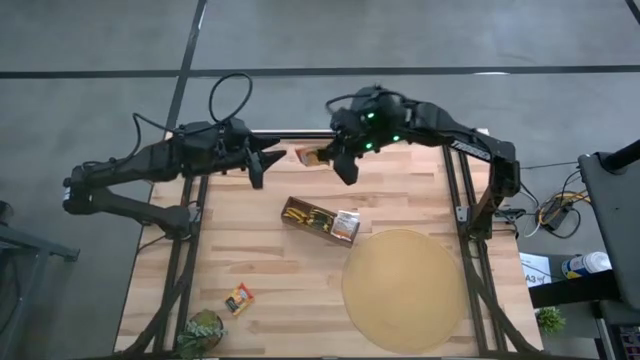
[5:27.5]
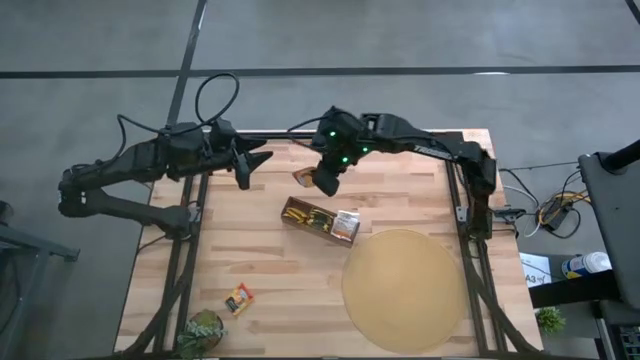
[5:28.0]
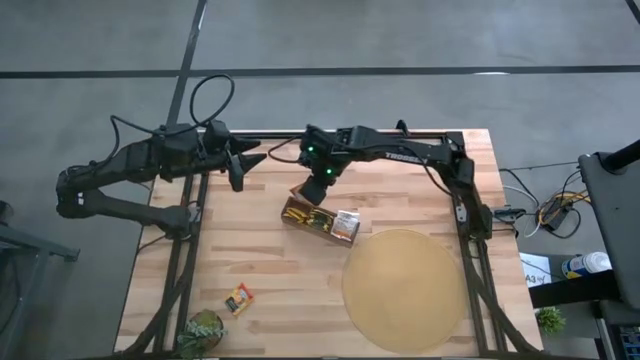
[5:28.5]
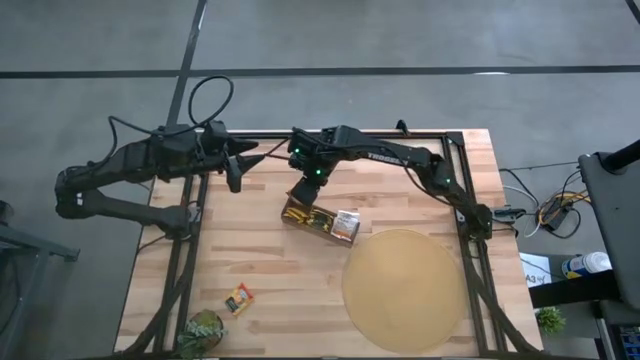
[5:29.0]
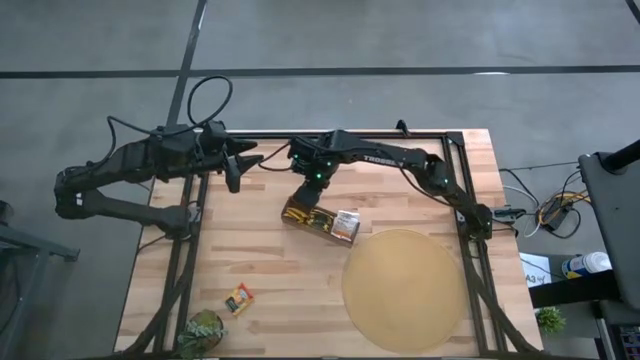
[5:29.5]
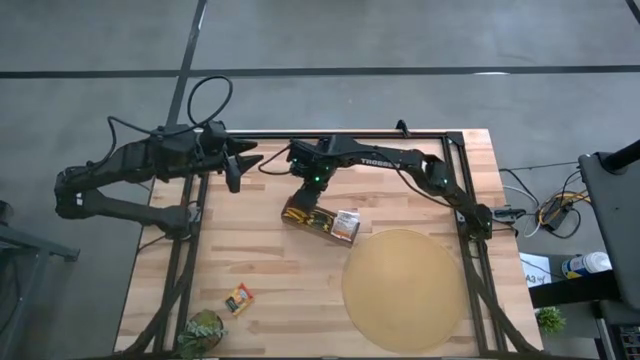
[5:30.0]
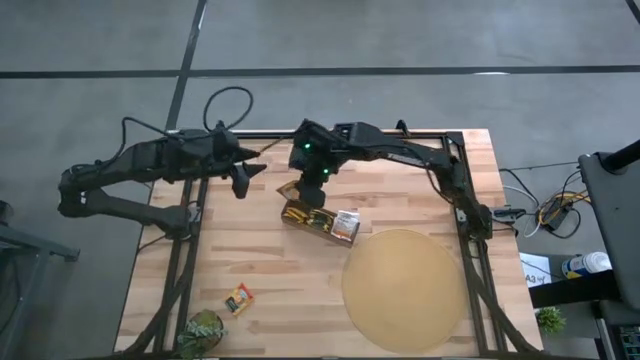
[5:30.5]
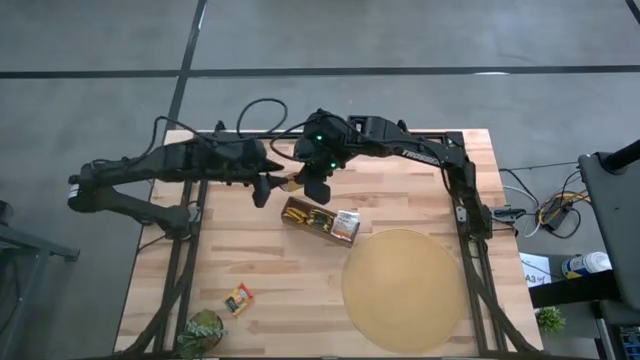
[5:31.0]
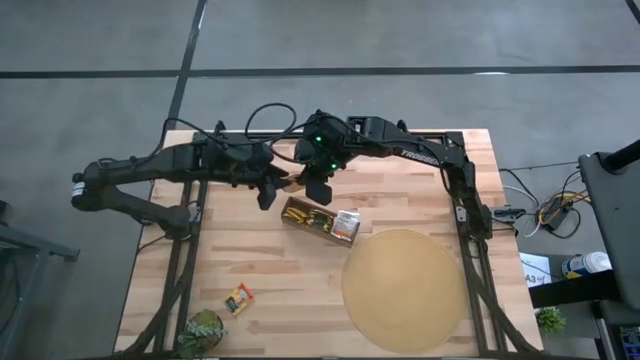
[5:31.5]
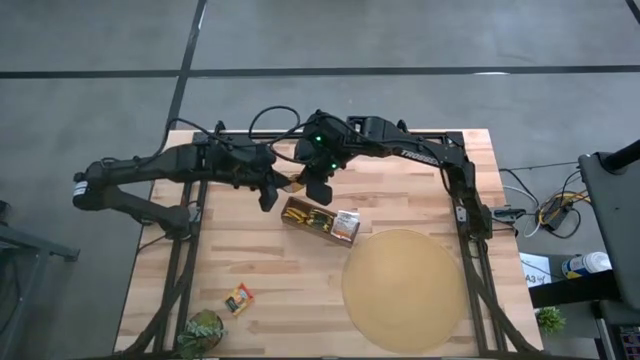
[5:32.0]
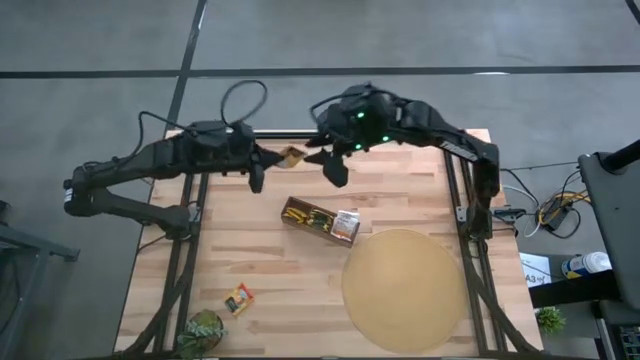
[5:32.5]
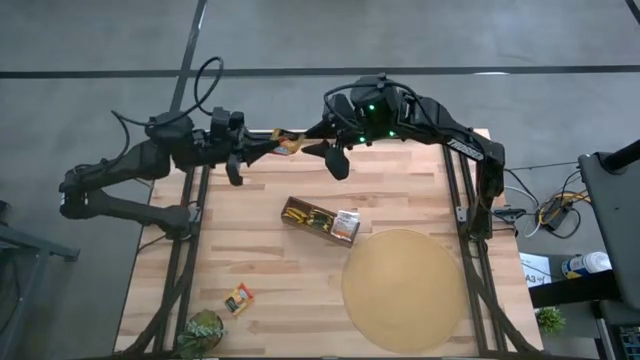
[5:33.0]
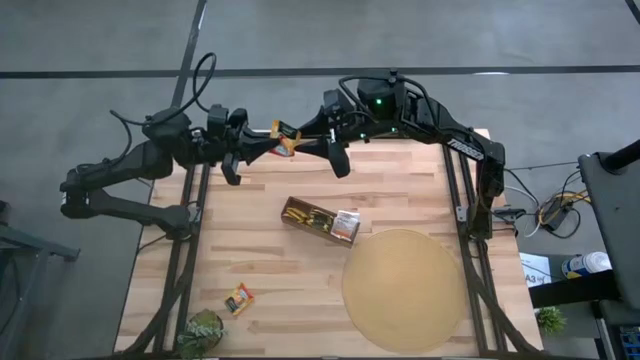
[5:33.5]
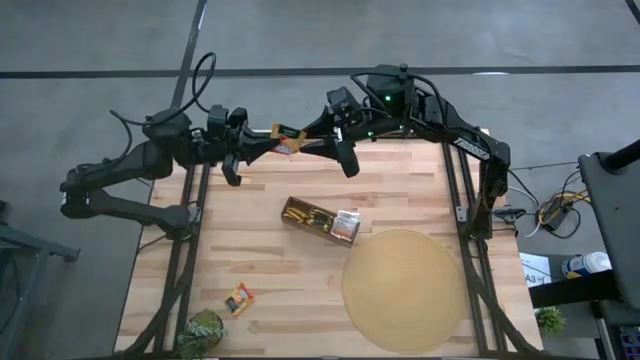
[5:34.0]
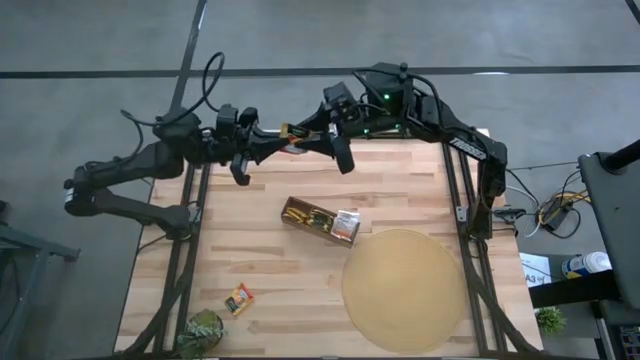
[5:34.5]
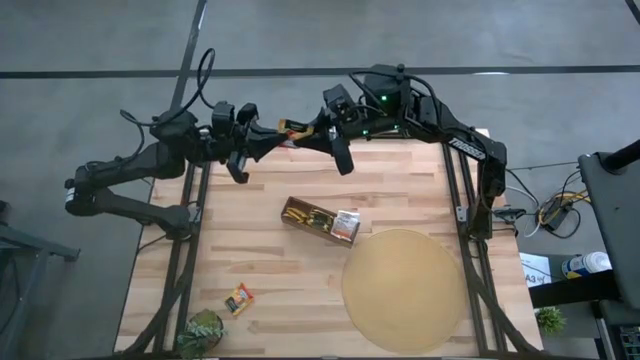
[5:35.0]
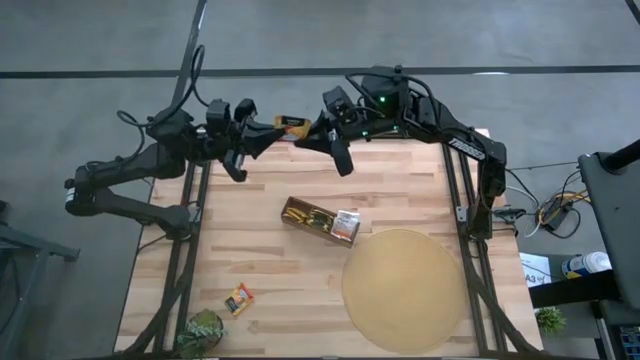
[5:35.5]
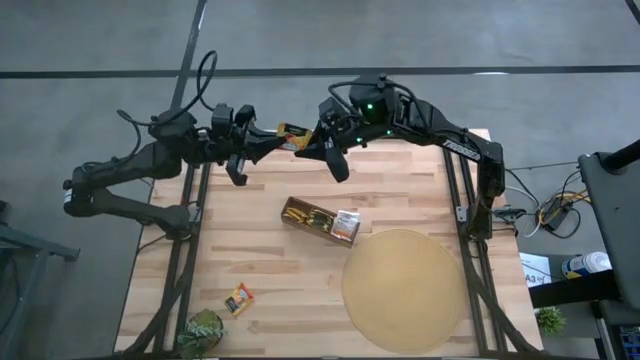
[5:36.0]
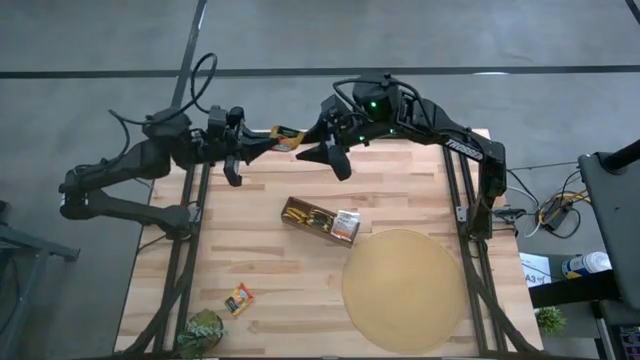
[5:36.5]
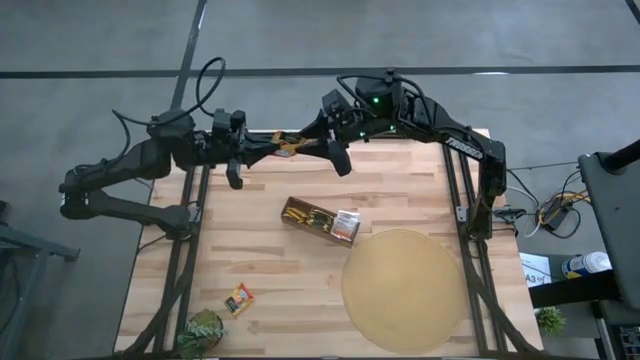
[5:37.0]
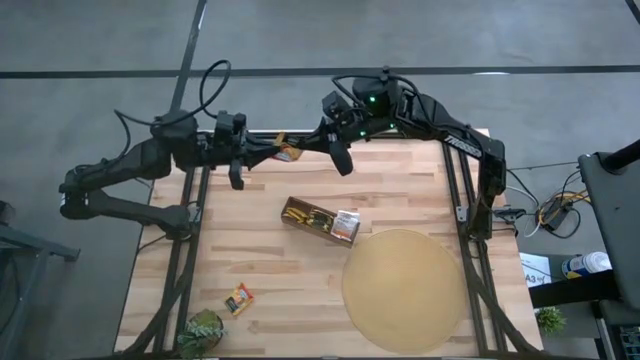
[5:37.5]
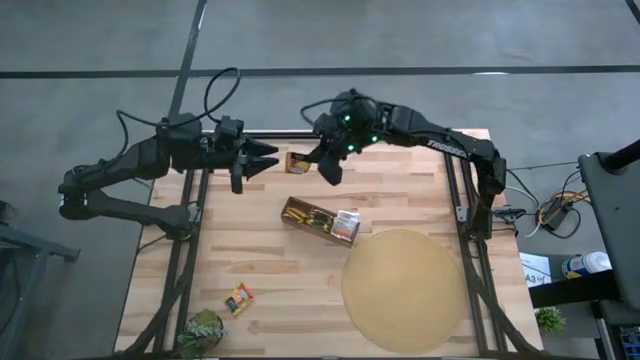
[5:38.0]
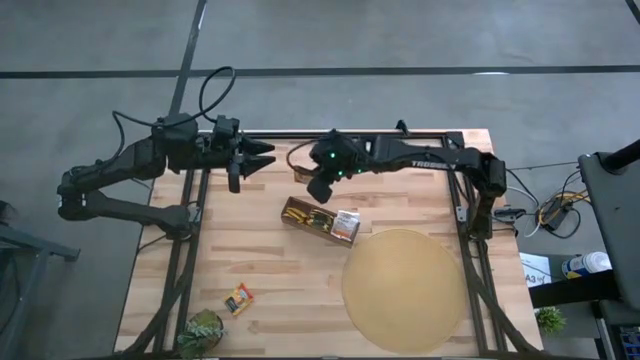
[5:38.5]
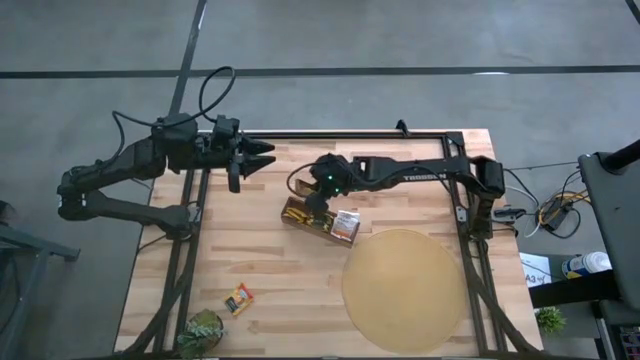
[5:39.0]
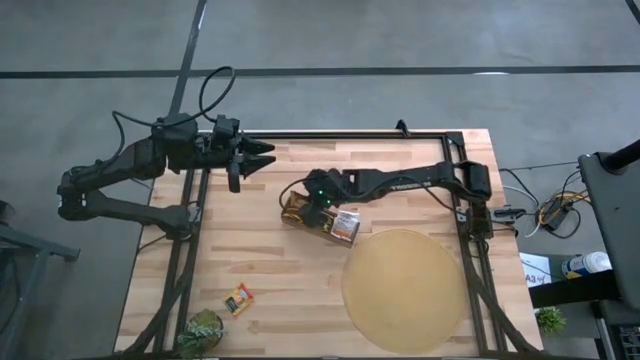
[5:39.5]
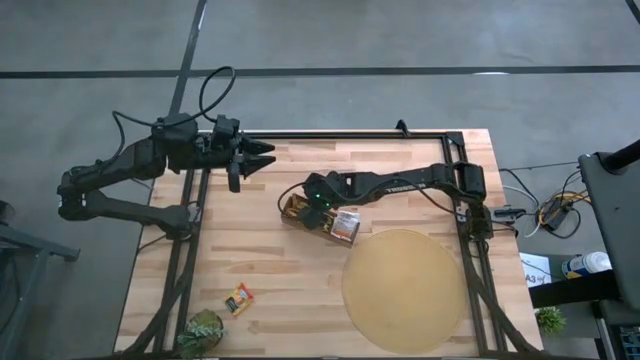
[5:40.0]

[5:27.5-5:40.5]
Task: Pick & Place Tea
Put the orange tea bag into the left section of the wooden organizer

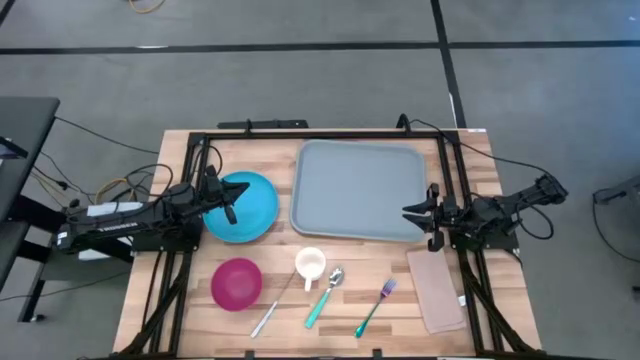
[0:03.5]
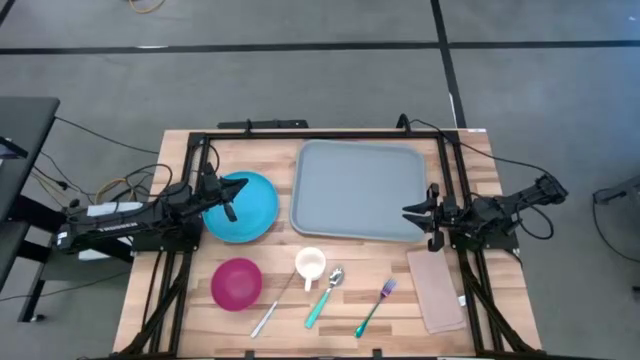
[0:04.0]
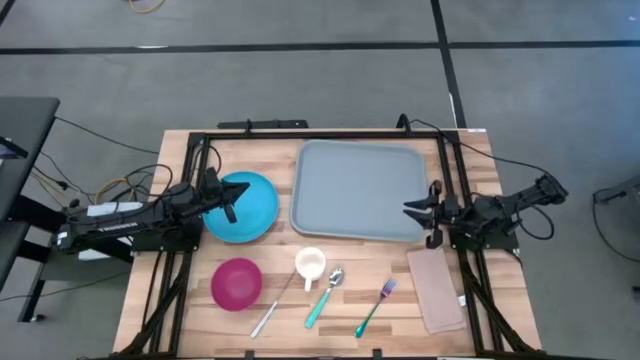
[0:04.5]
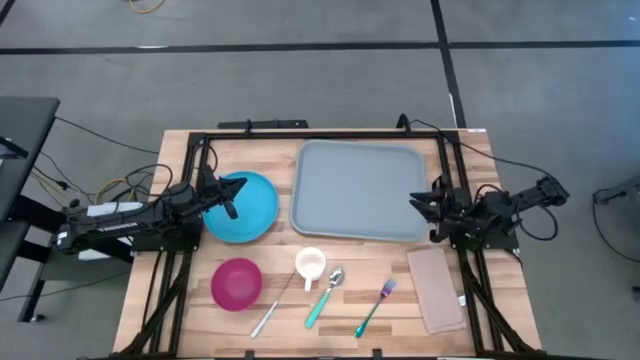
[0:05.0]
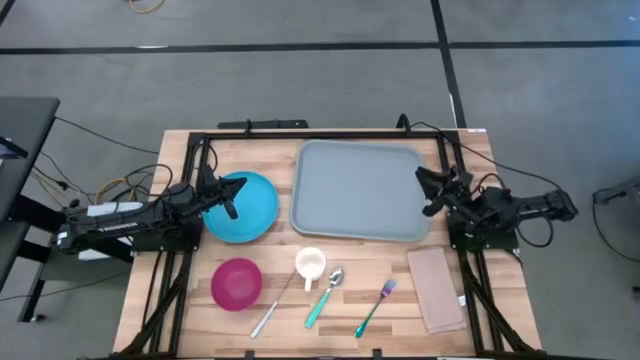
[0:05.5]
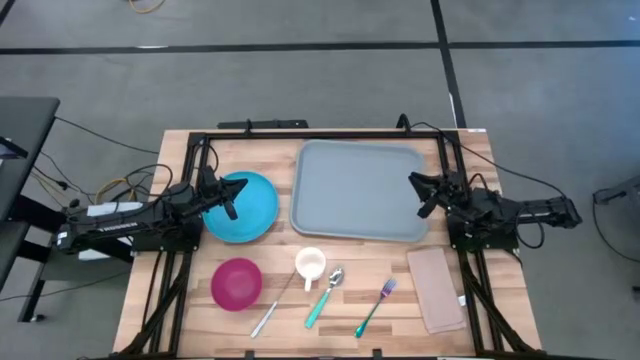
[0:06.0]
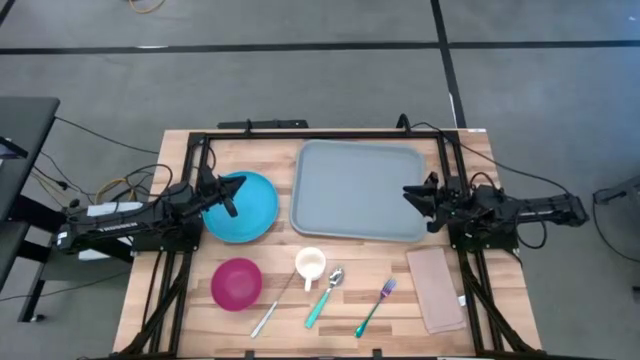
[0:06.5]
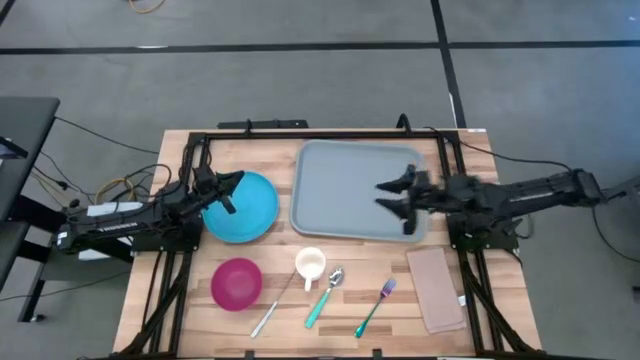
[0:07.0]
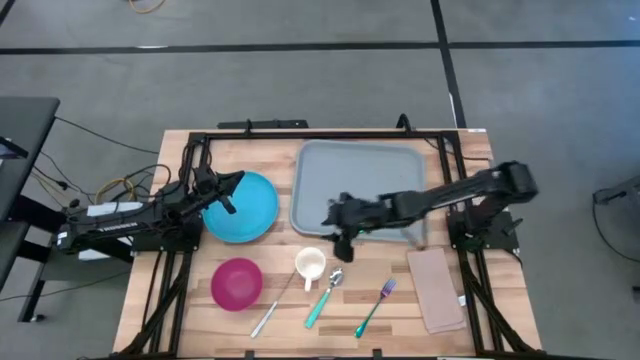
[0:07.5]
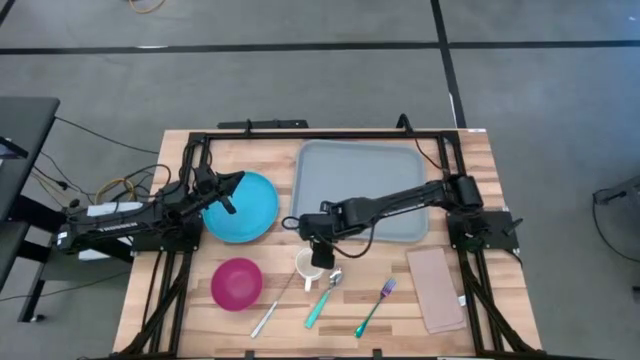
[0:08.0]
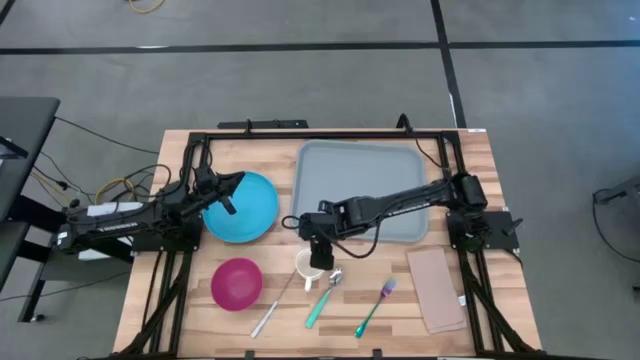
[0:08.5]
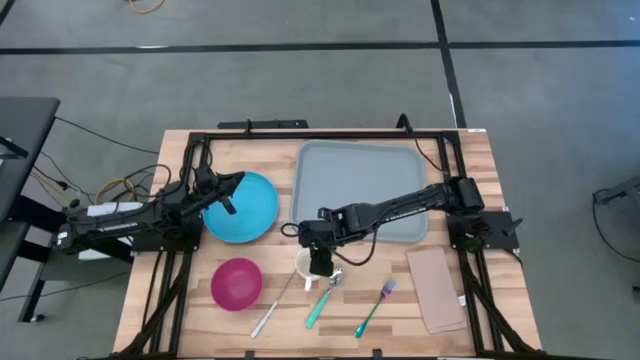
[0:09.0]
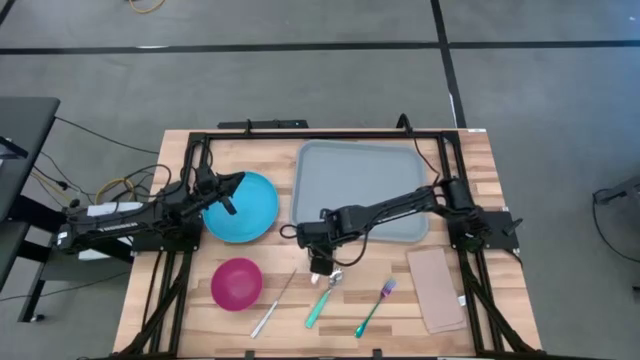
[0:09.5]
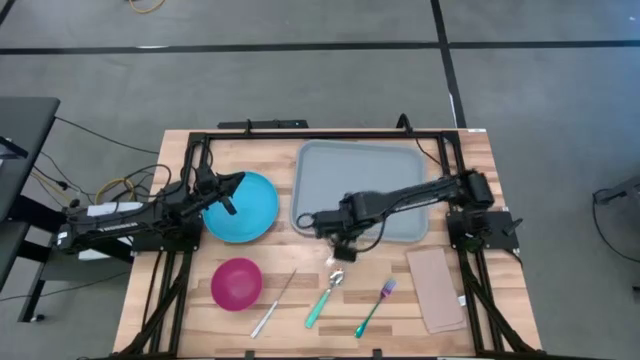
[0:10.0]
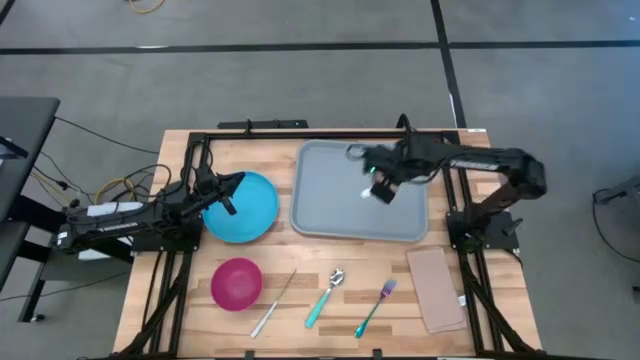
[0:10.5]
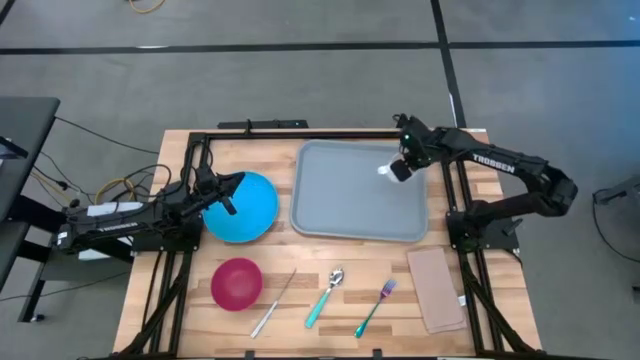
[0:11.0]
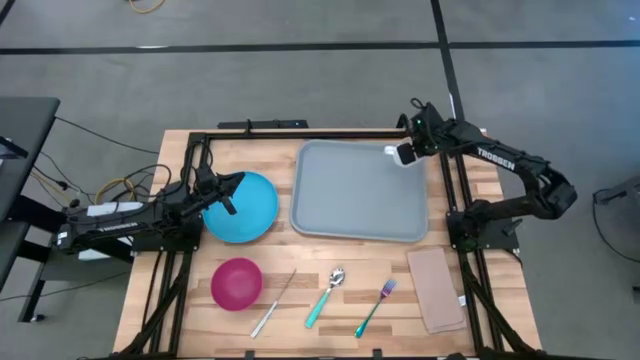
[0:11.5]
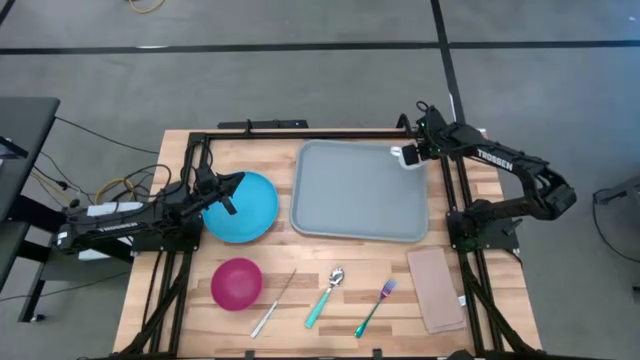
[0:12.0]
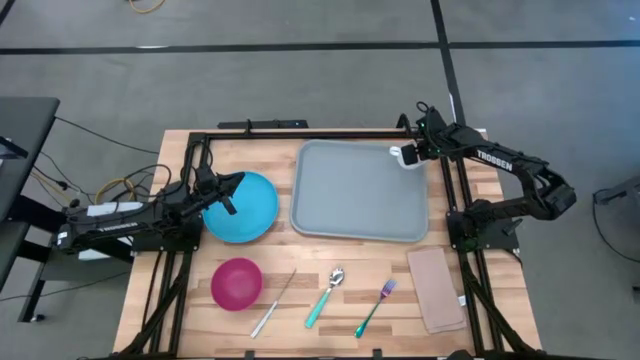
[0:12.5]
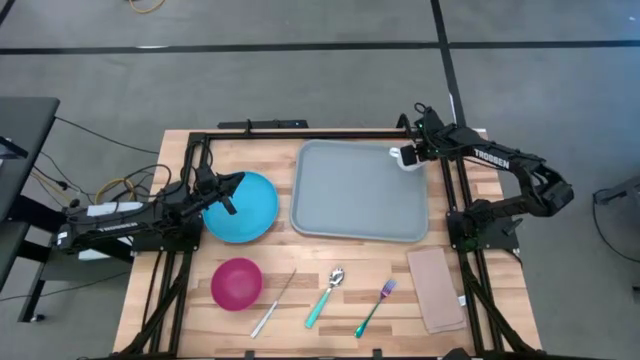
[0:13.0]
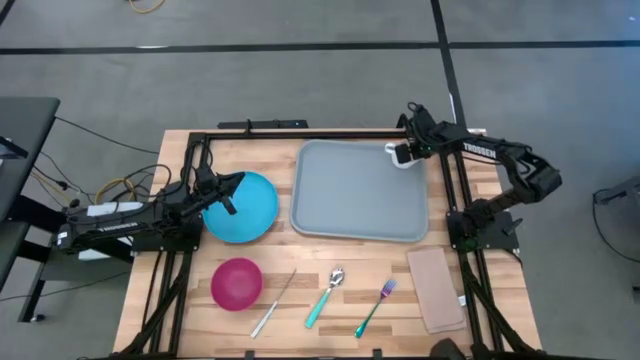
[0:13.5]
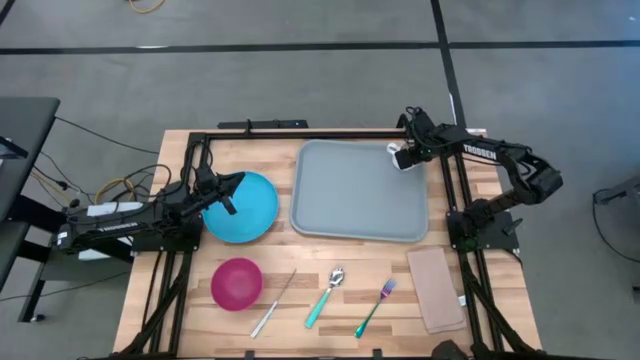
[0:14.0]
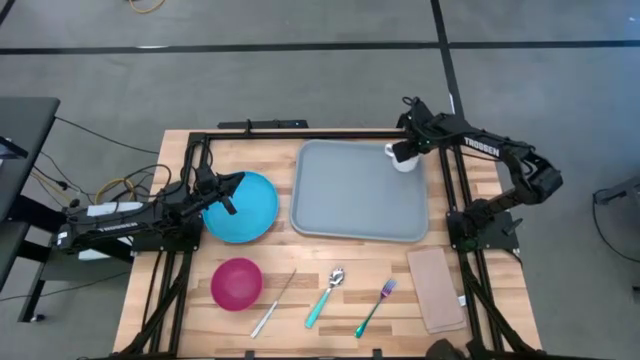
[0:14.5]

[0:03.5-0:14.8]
Task: Set up tray
Put the white mug to the top right on the gray serving tray
